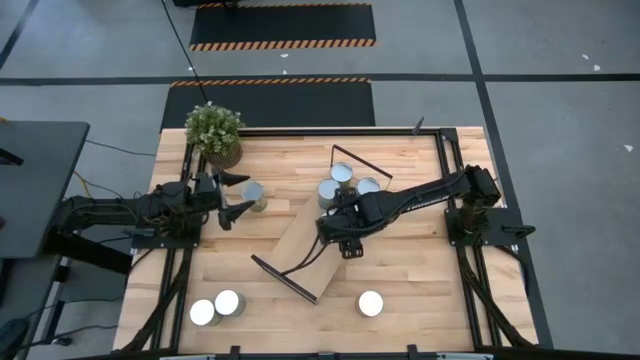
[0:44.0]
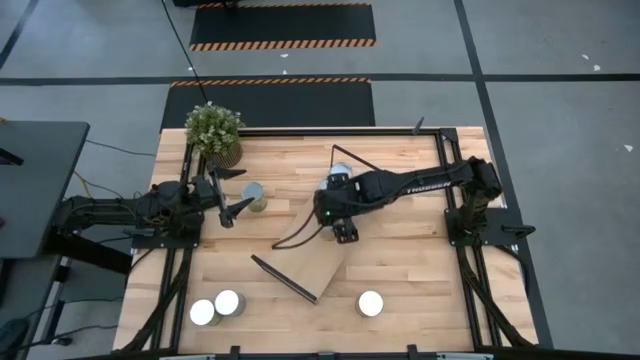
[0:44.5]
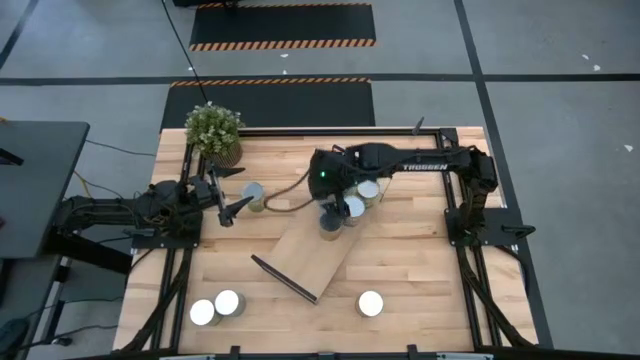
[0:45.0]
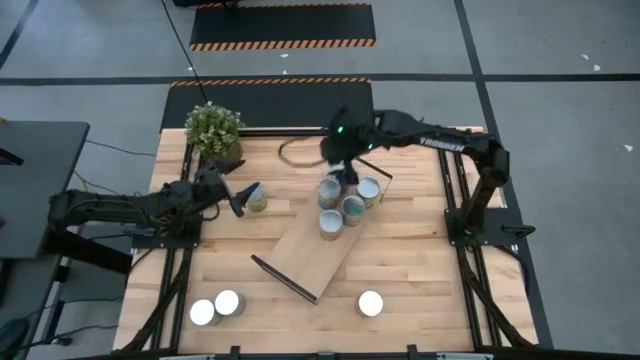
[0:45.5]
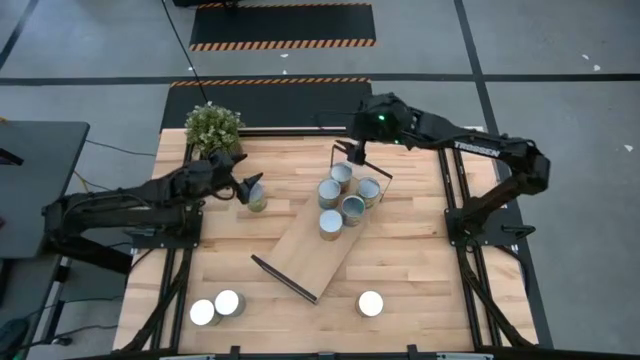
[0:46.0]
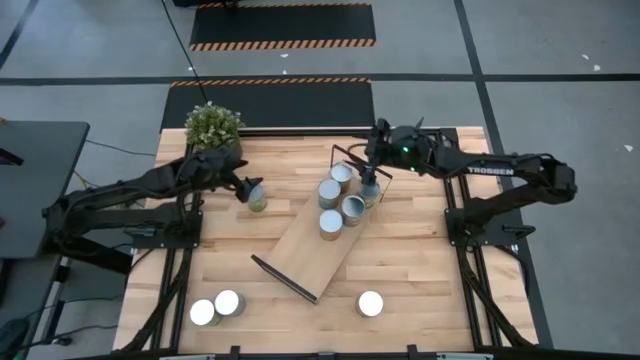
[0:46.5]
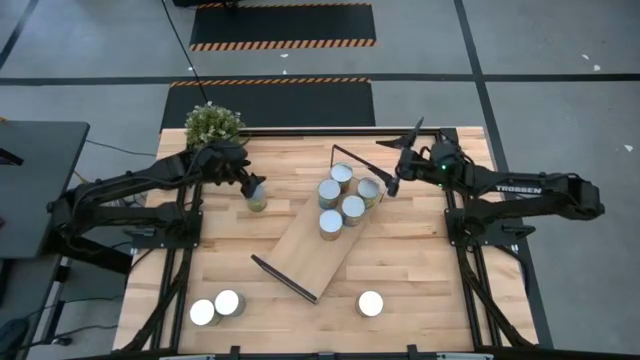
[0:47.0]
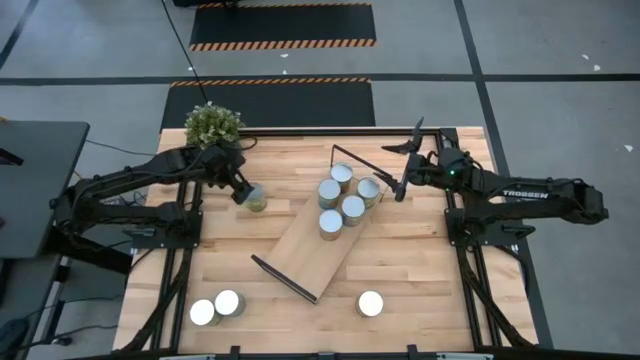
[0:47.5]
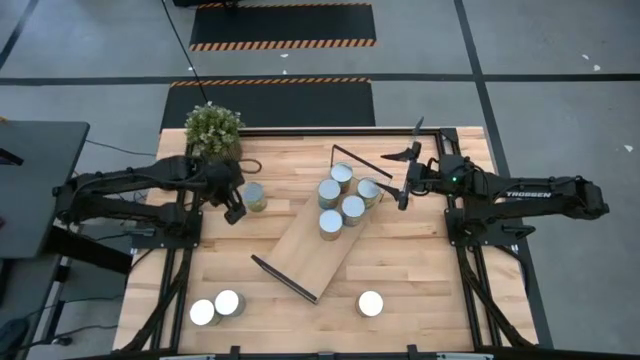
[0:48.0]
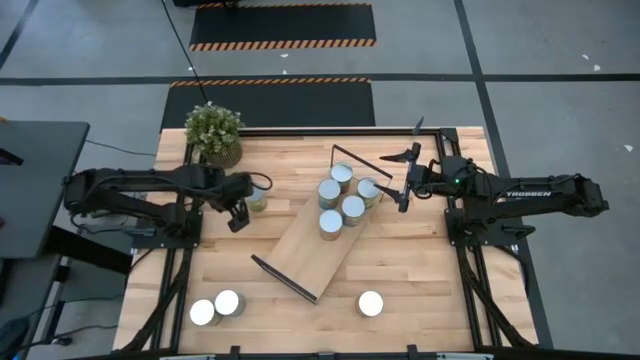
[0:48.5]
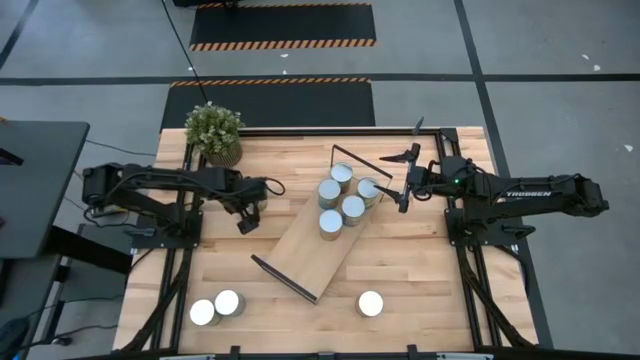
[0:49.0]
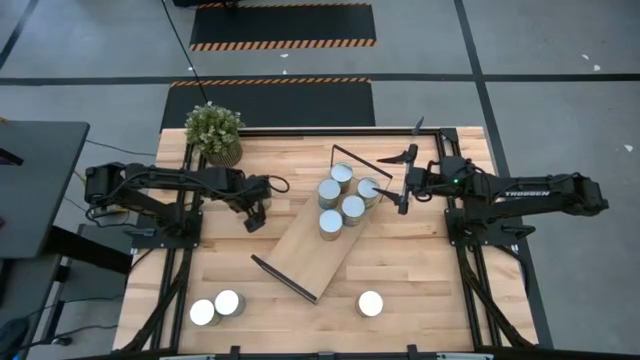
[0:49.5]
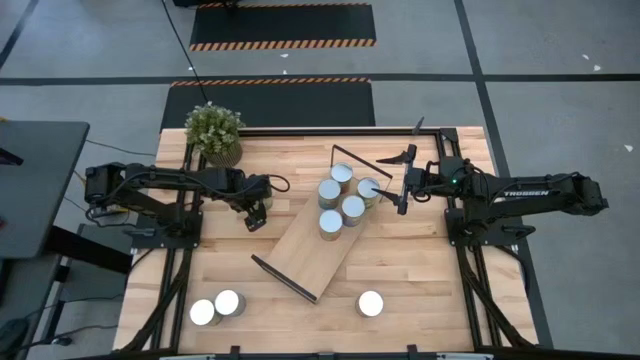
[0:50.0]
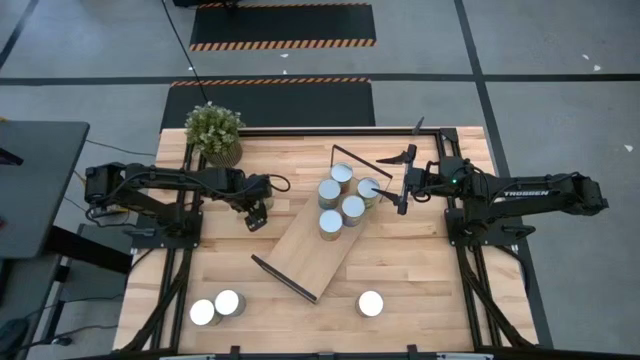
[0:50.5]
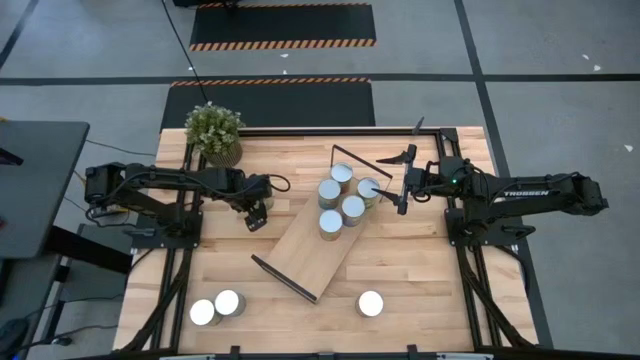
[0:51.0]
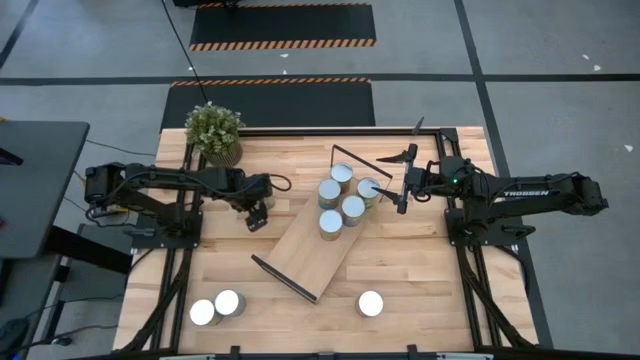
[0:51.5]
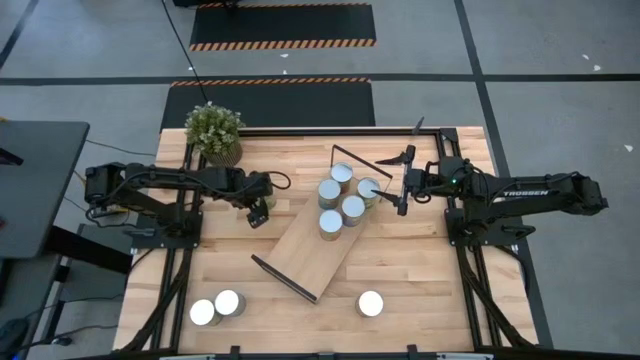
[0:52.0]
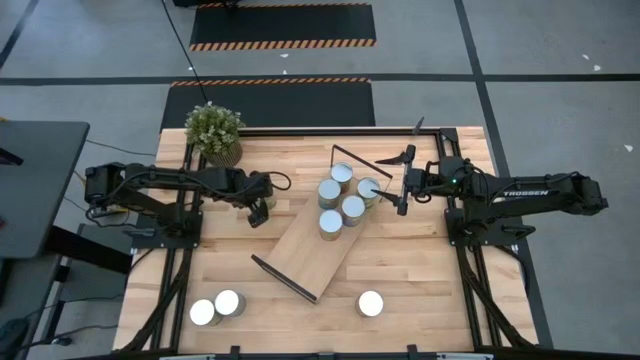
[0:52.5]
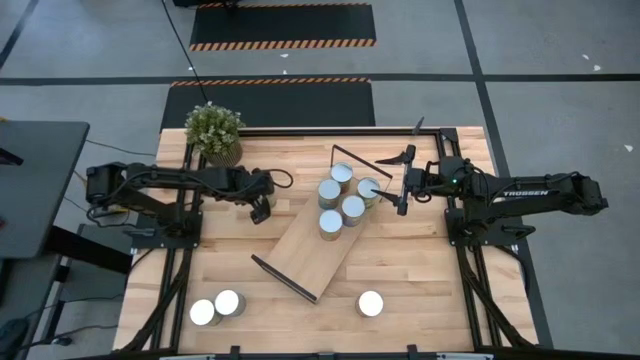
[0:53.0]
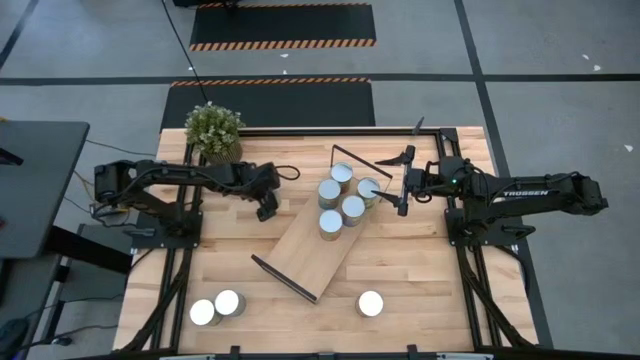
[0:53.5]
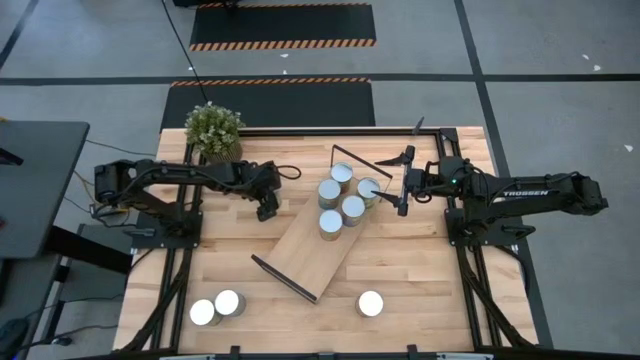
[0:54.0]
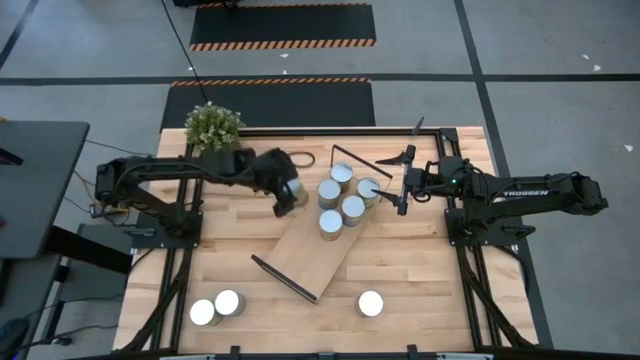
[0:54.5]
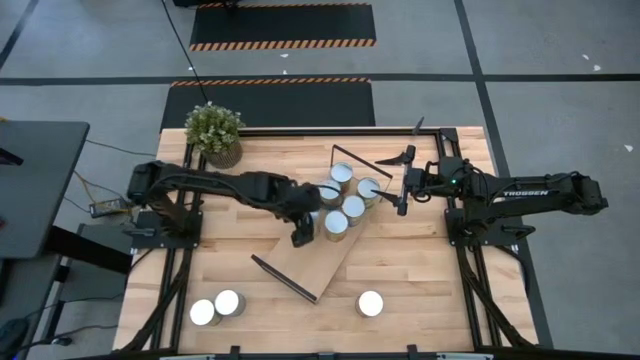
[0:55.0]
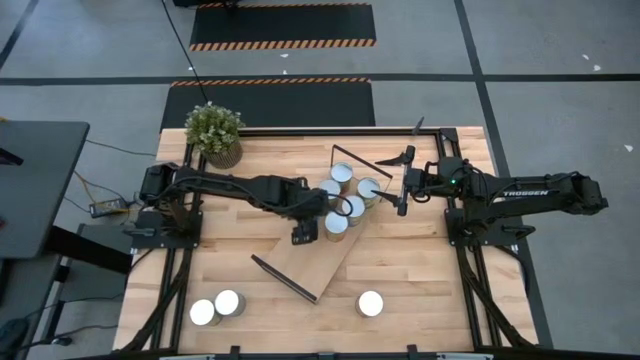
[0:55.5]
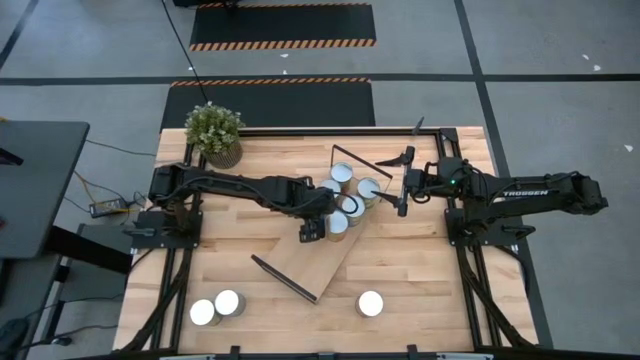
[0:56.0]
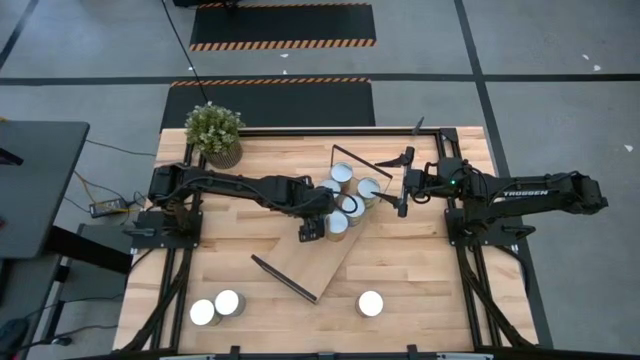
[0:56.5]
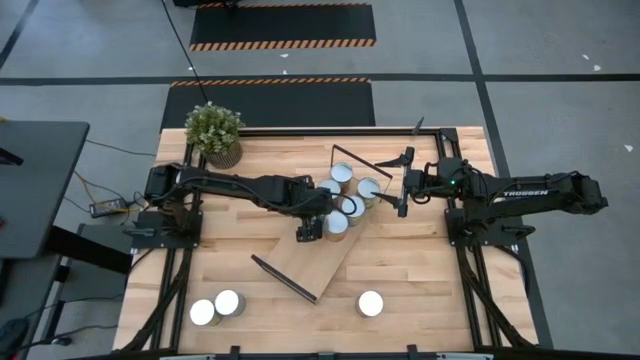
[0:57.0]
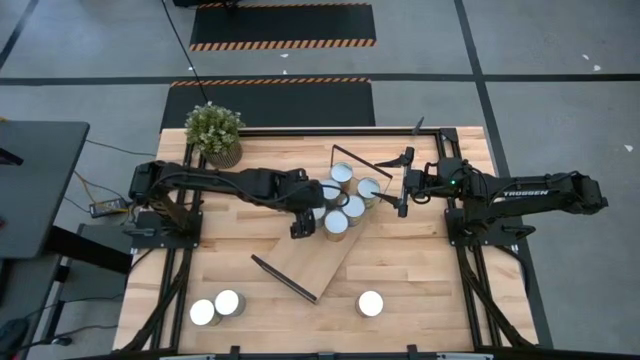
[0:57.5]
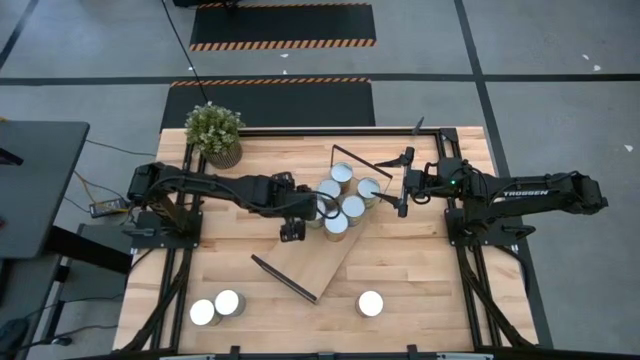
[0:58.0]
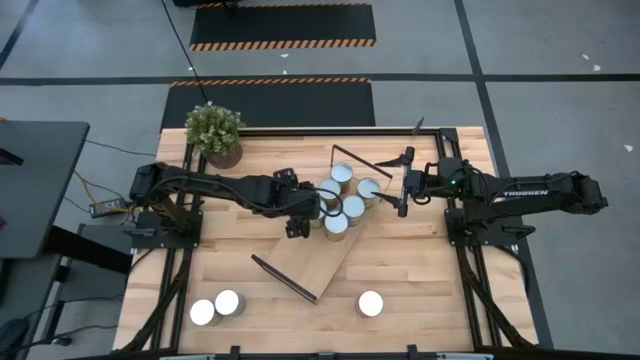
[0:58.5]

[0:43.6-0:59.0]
Task: Pick and place cans onto a shelf
Put the top canned oranges on the shelf

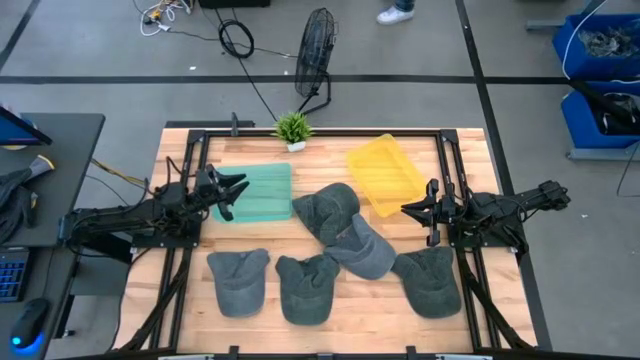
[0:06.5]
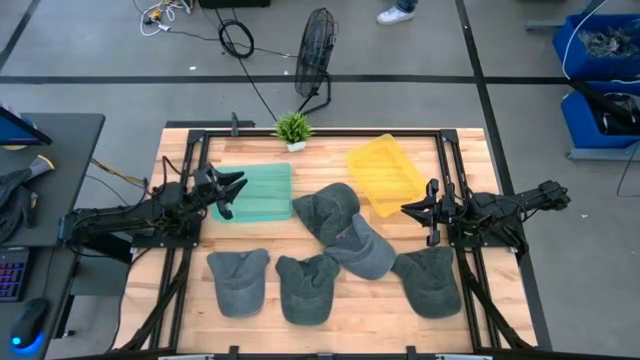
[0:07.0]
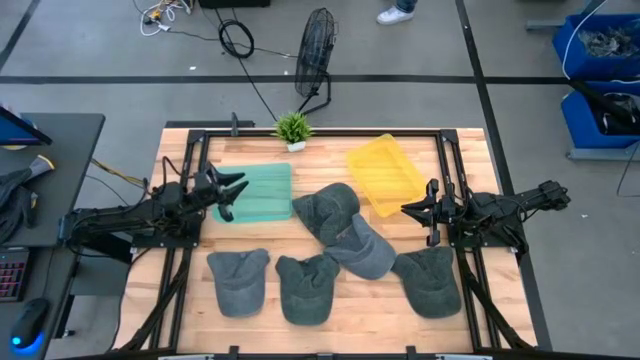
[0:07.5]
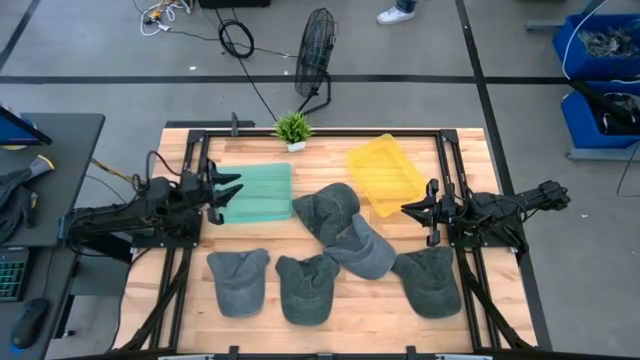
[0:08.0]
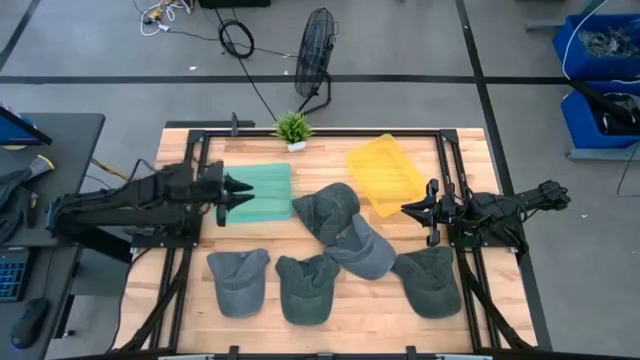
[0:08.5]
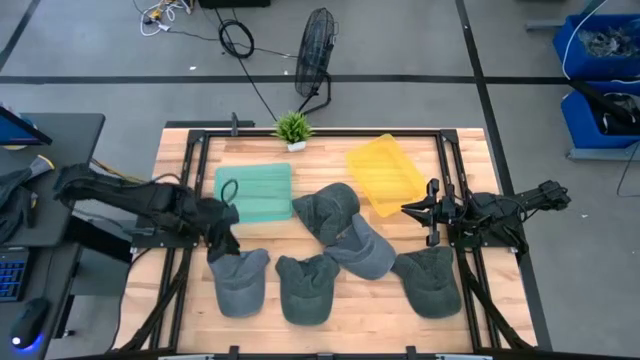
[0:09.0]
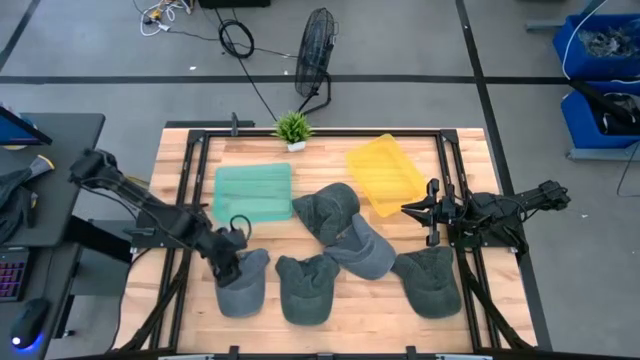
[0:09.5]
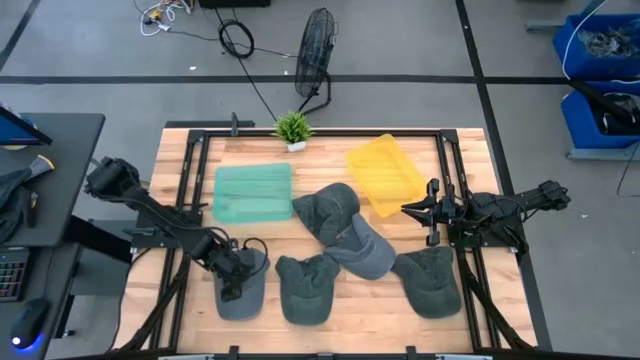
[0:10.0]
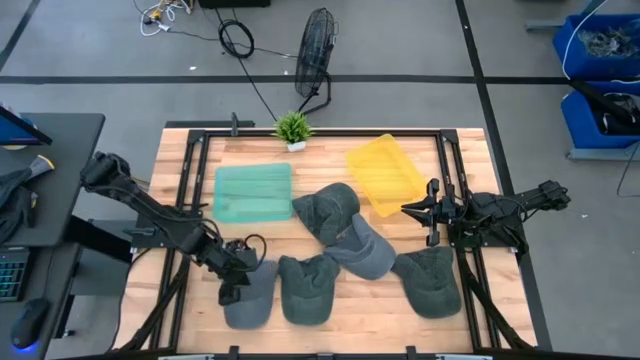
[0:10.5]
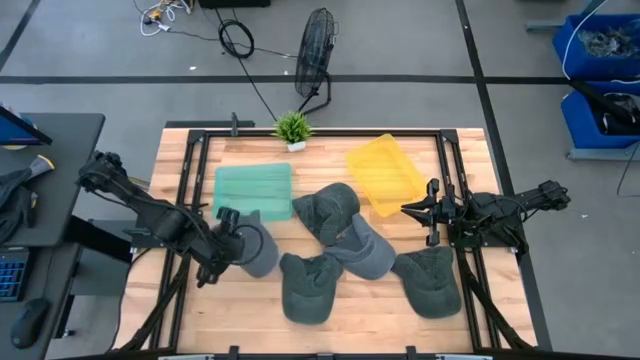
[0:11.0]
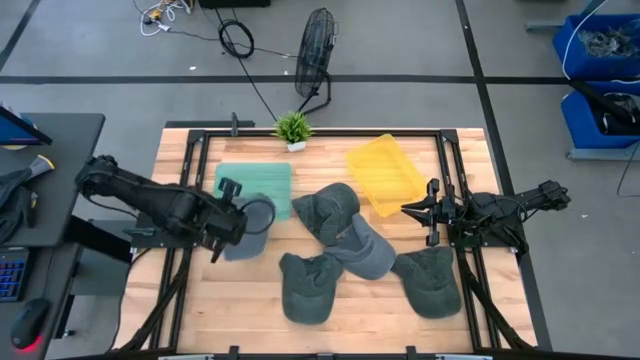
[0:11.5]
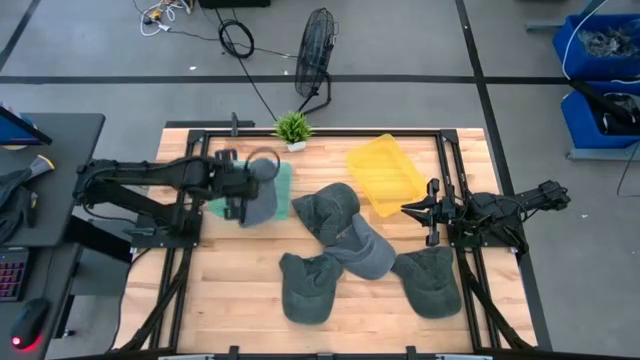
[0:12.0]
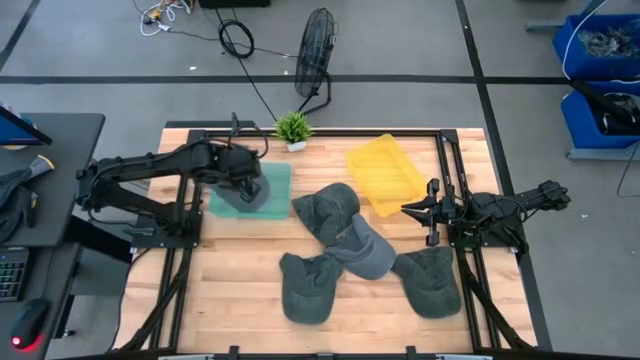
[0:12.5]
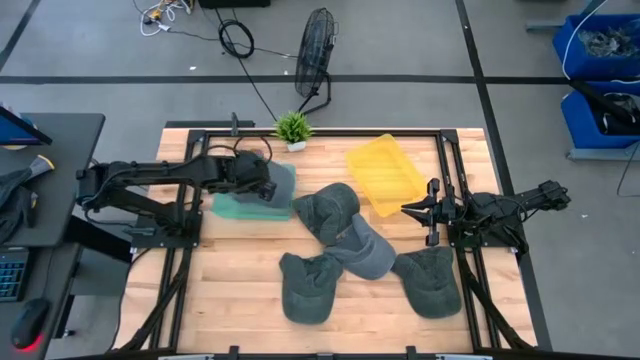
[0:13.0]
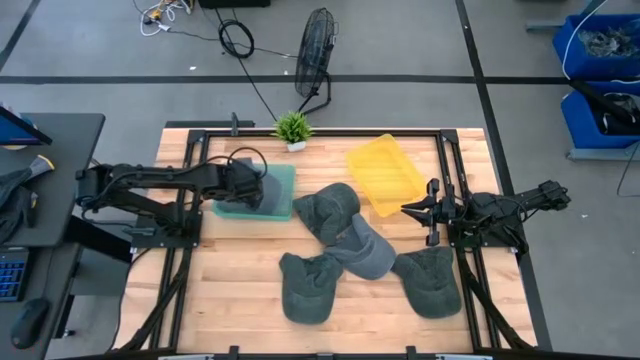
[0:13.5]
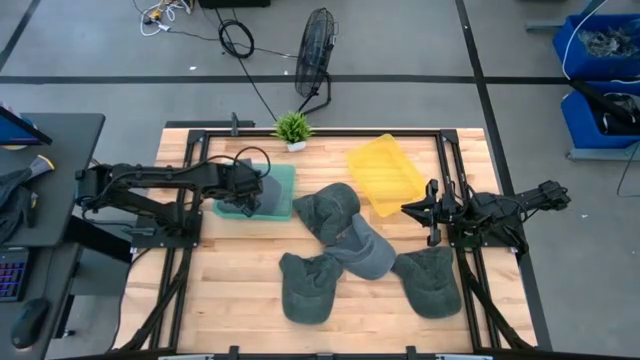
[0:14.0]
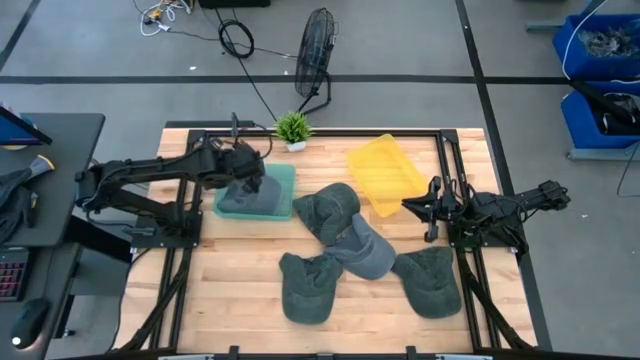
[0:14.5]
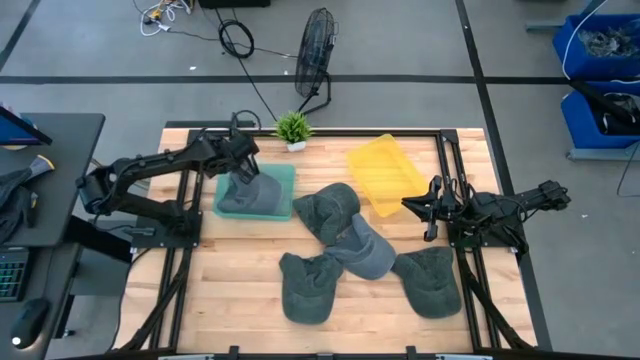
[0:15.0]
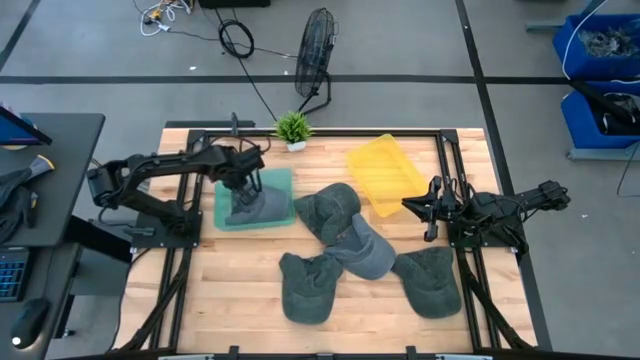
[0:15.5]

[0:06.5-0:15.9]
Task: Pick & Place hat
Put the bottom gray cap into the green bin
